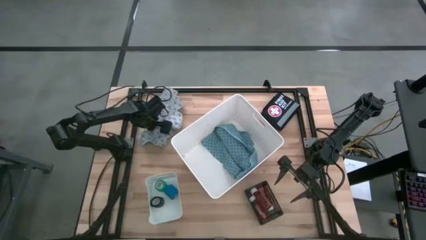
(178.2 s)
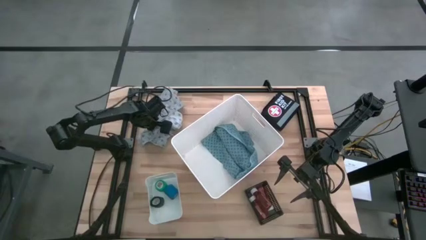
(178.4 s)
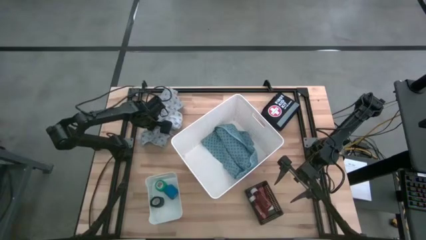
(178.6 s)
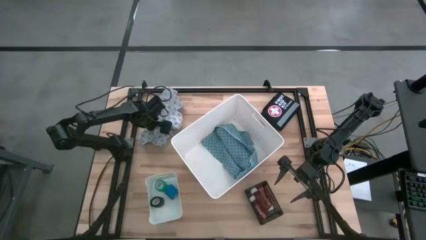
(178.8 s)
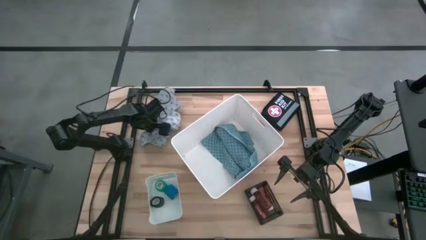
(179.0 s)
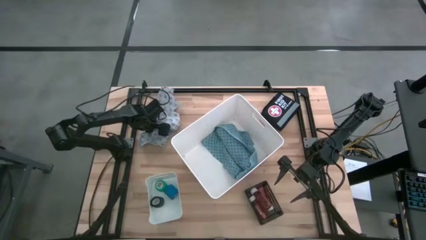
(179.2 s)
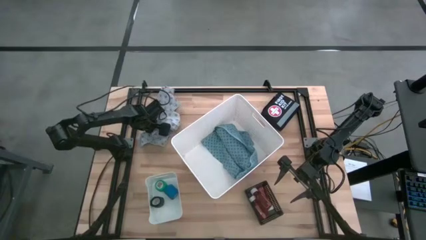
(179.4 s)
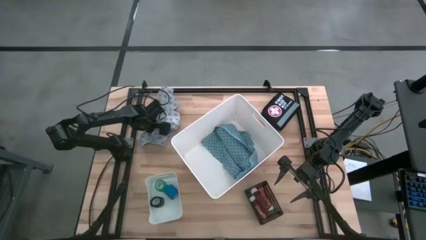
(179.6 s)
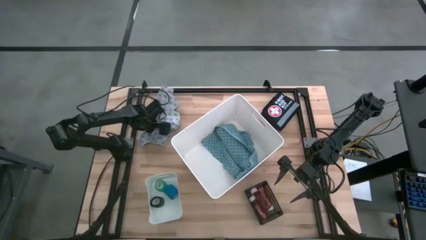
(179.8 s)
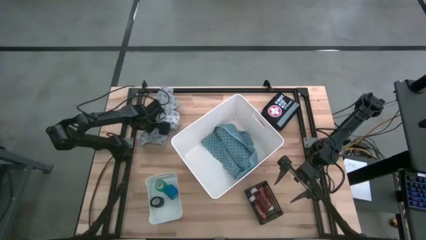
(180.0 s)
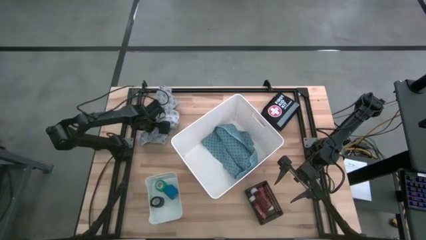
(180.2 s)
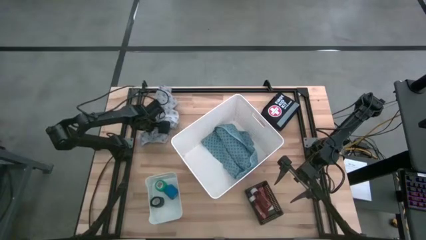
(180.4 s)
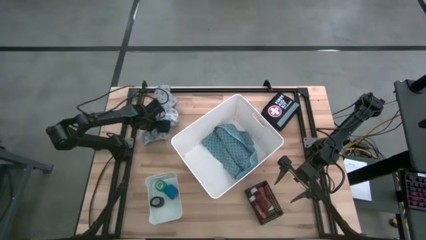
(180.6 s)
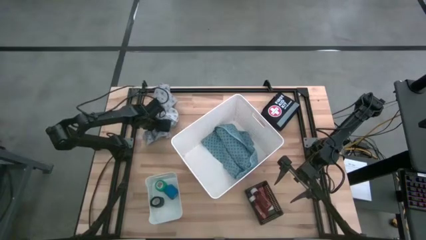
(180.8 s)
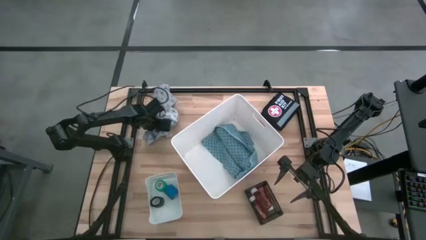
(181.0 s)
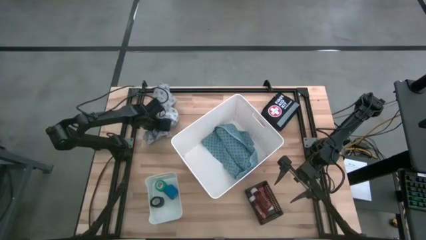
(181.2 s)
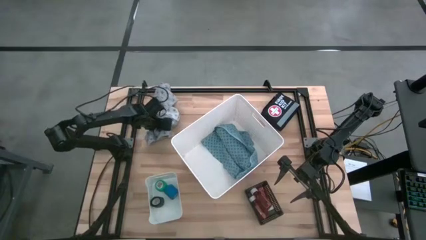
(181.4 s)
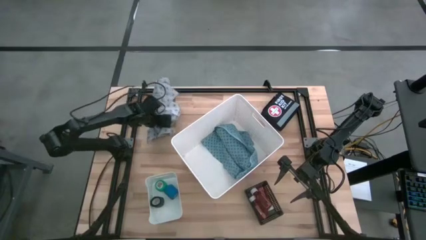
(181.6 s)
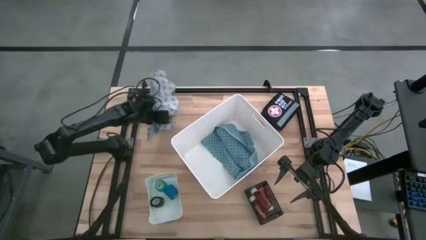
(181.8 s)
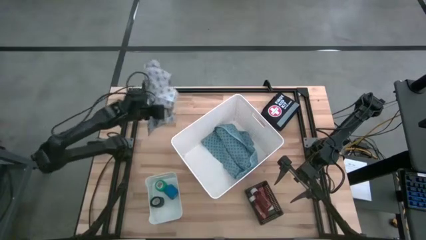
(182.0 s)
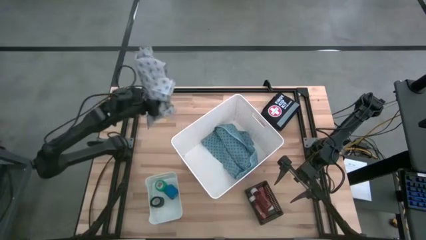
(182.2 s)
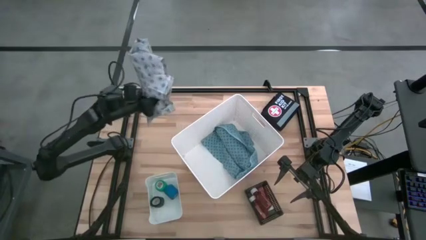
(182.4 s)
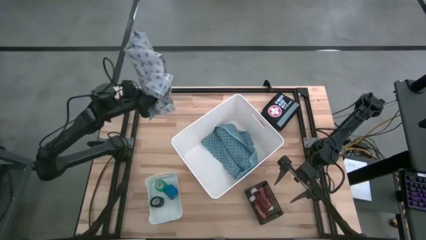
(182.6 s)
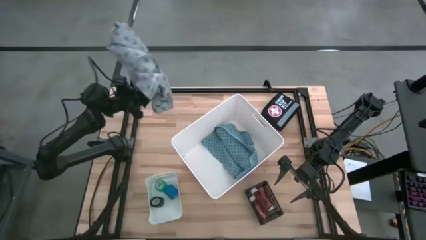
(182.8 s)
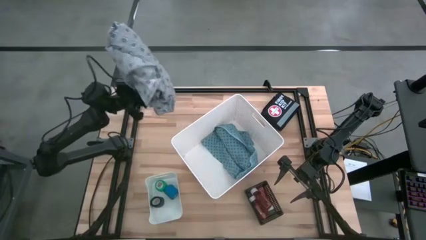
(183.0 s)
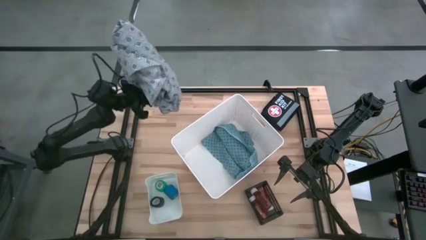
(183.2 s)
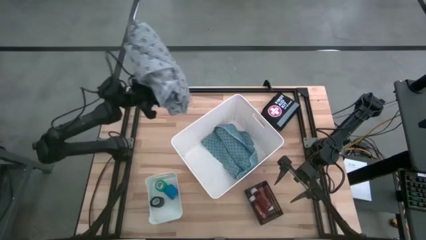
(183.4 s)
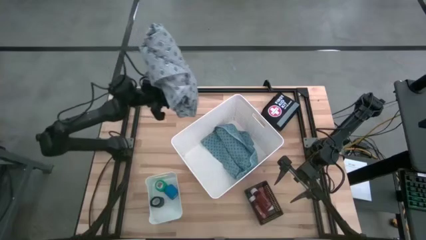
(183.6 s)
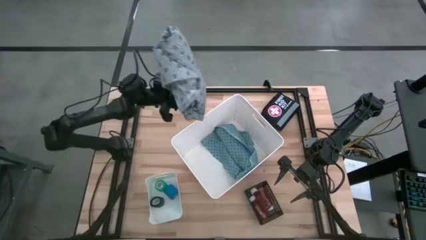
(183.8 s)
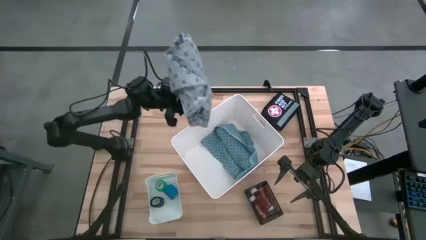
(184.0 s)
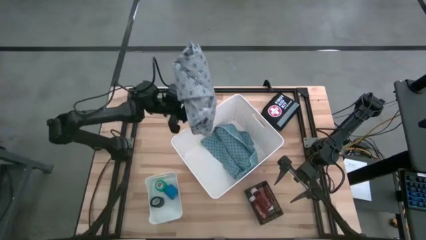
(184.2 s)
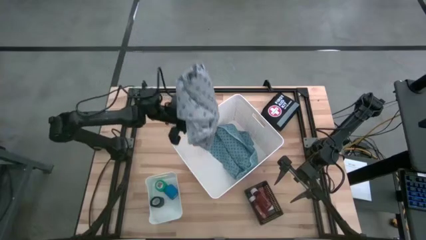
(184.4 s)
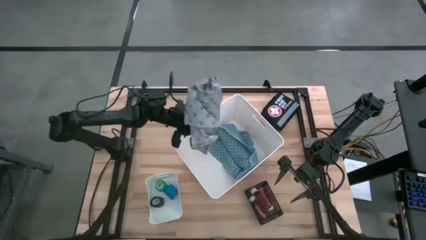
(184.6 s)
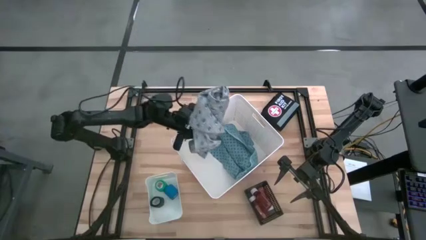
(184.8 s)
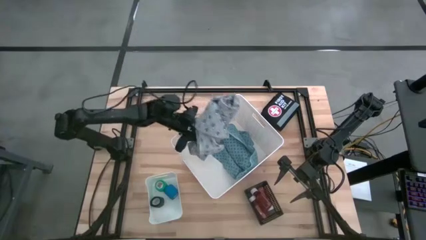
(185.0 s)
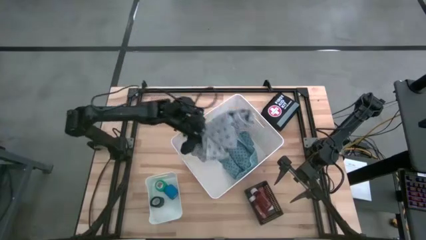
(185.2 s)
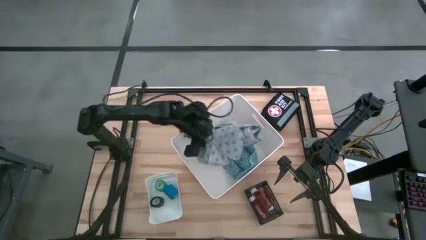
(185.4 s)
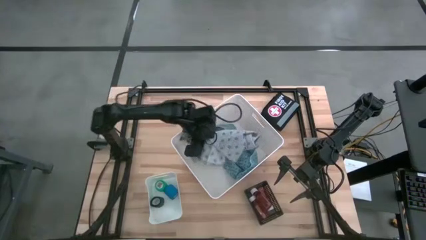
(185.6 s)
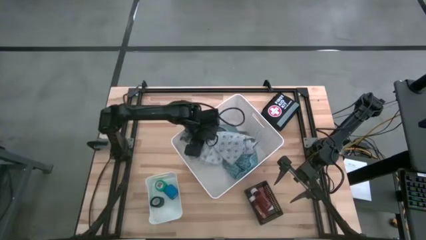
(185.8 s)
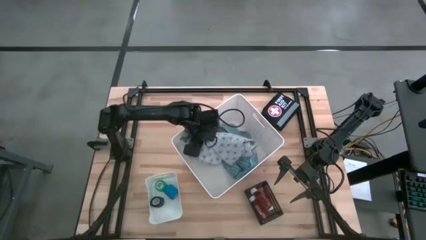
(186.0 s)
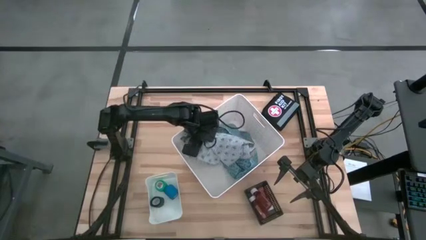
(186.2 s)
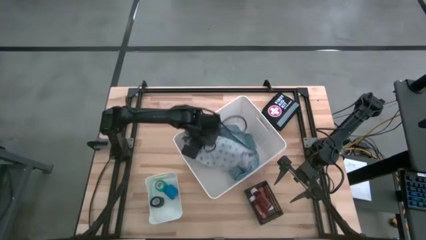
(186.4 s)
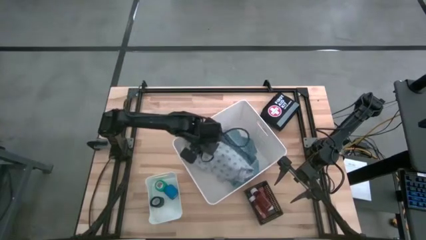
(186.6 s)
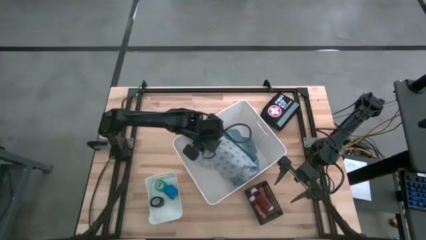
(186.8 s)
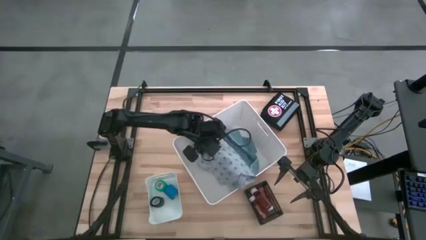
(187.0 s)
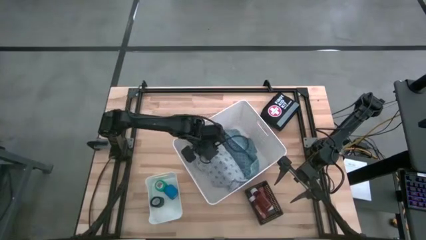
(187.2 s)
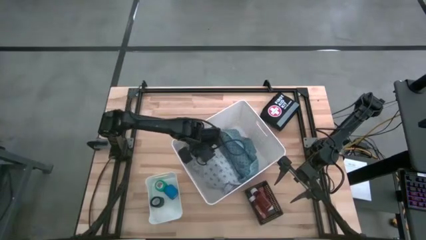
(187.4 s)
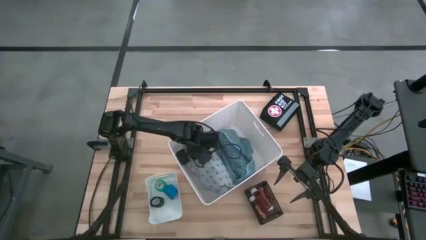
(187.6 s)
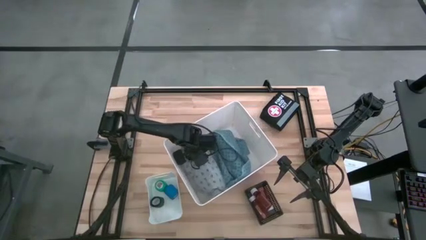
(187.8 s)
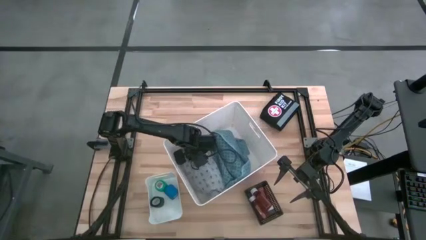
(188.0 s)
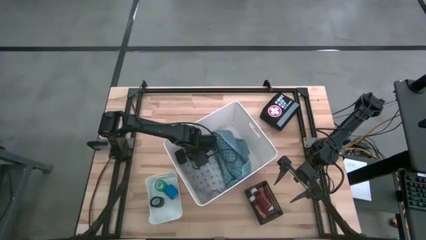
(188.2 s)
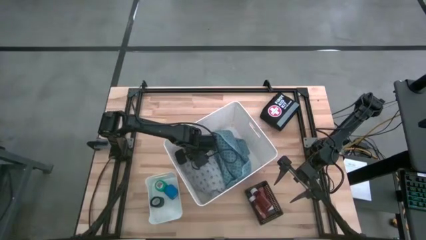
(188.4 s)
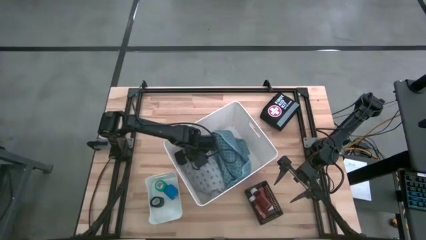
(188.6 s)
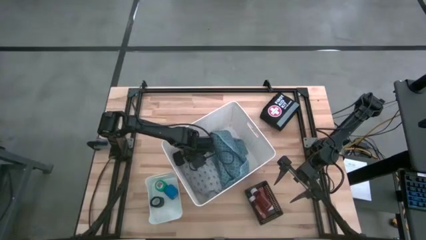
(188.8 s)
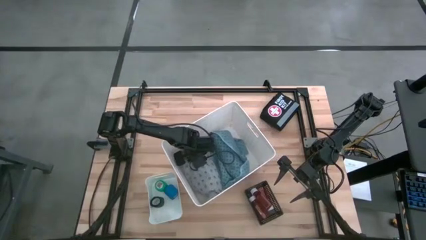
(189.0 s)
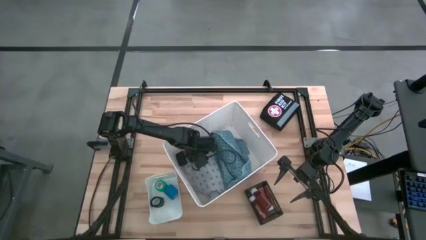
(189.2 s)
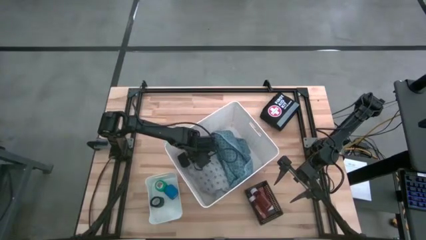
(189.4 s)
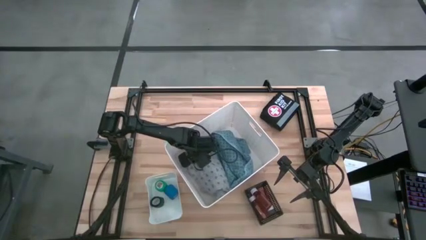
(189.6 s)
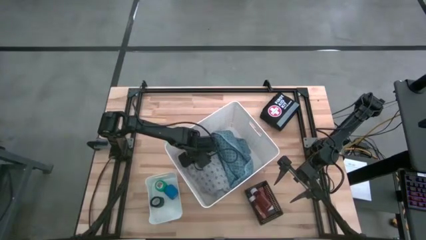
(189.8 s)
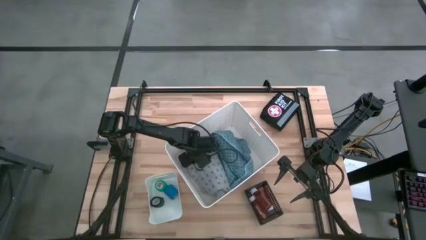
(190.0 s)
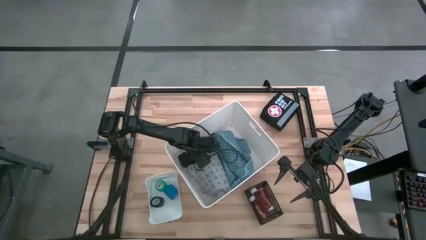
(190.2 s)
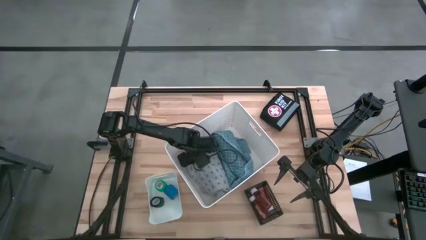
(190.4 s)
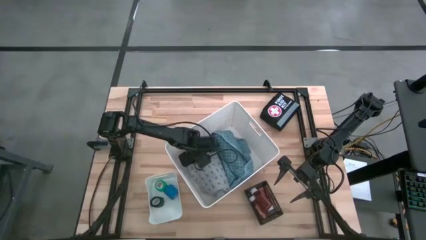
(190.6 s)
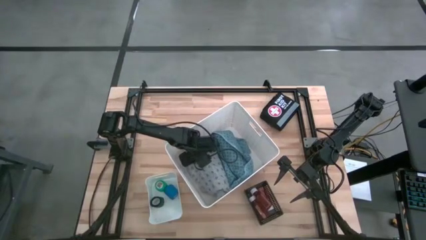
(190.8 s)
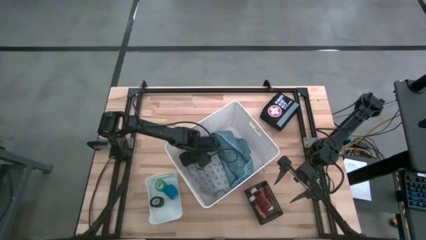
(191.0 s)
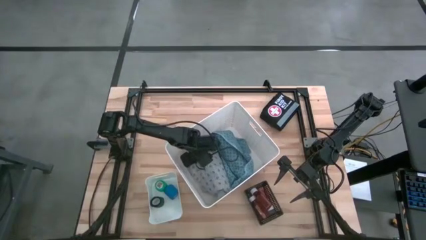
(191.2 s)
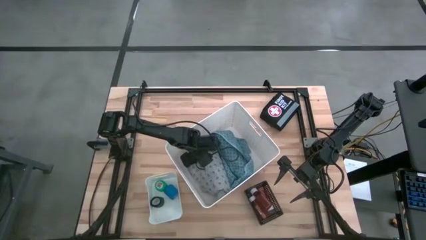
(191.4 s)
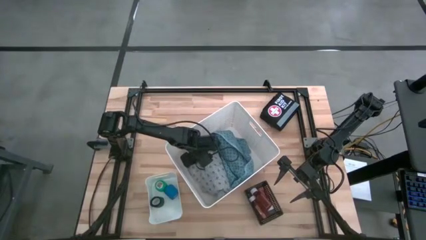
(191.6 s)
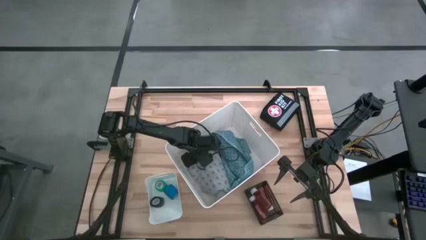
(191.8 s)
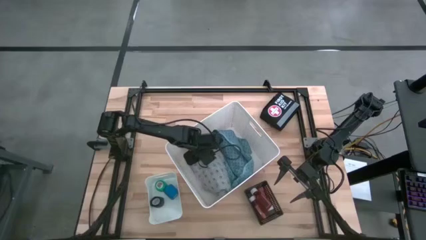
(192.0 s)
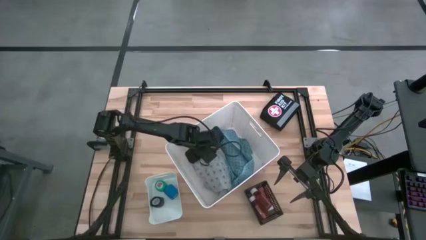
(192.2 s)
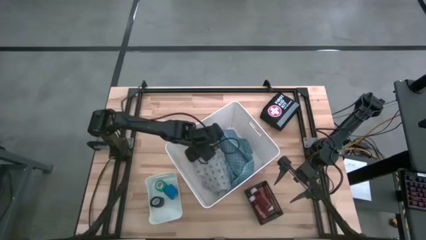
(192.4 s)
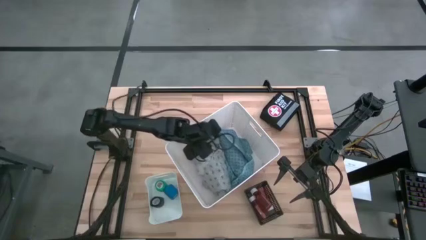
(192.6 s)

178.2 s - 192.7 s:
Task: Pick & place medical supplies in basket/bin
Put the white patient gown into the white laundry bin
